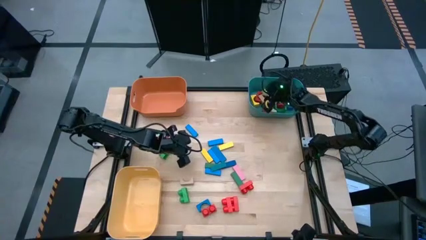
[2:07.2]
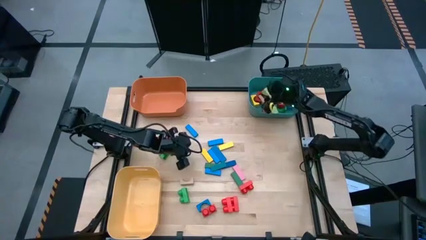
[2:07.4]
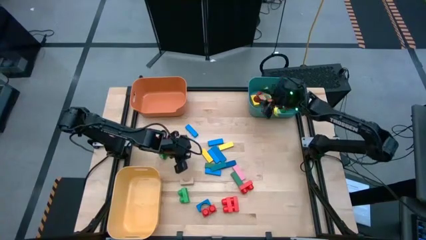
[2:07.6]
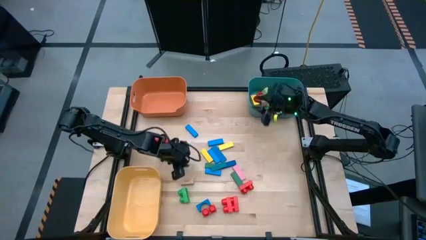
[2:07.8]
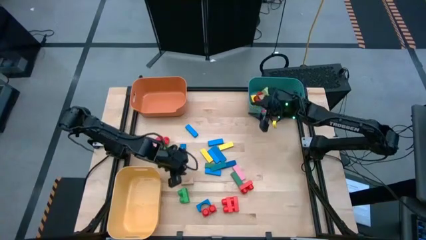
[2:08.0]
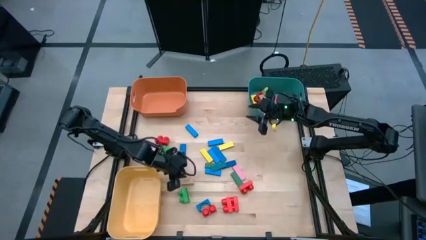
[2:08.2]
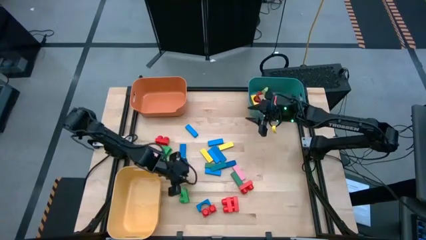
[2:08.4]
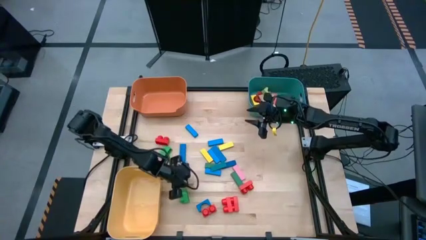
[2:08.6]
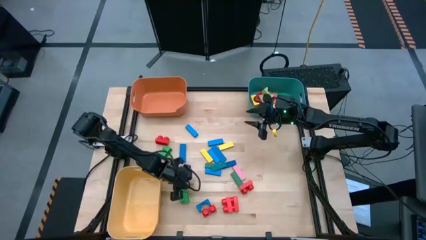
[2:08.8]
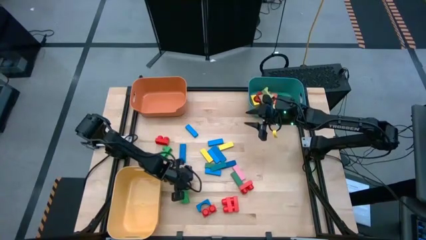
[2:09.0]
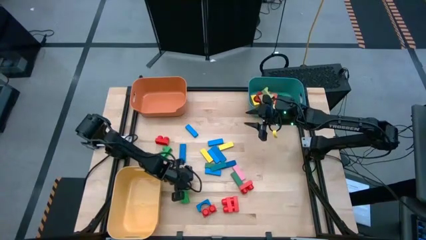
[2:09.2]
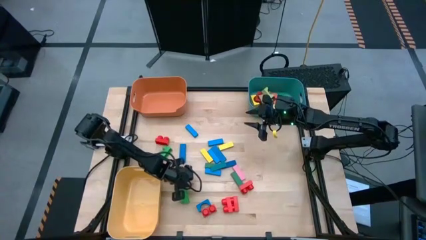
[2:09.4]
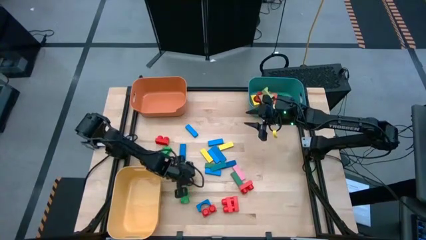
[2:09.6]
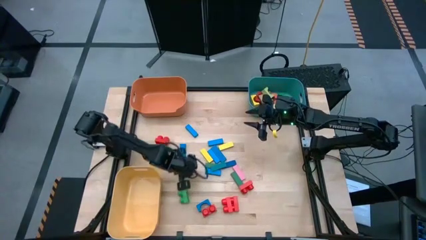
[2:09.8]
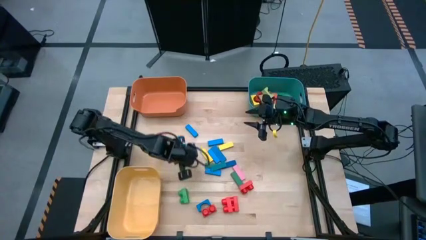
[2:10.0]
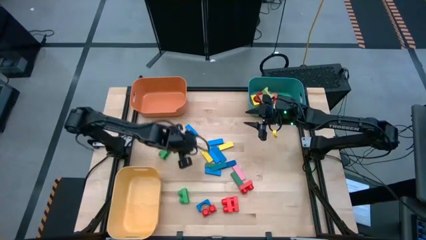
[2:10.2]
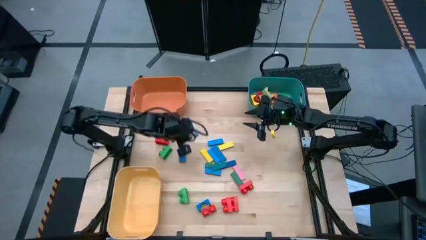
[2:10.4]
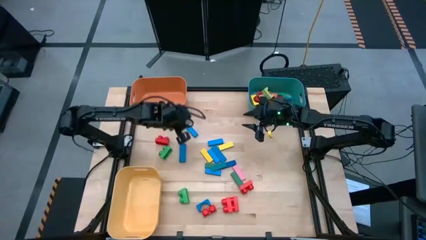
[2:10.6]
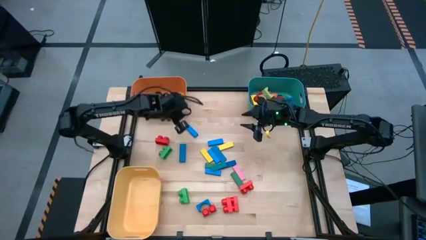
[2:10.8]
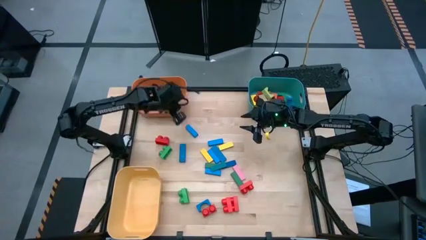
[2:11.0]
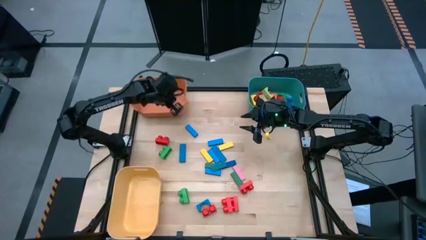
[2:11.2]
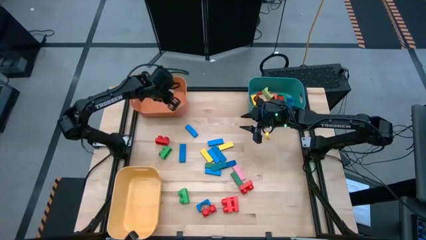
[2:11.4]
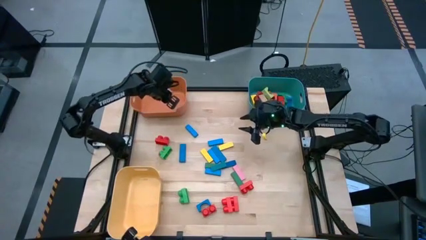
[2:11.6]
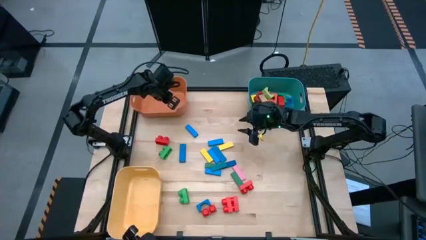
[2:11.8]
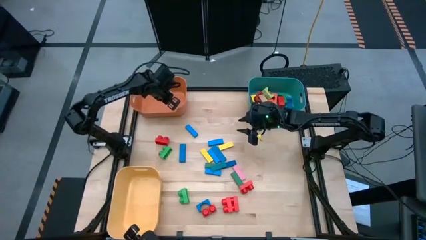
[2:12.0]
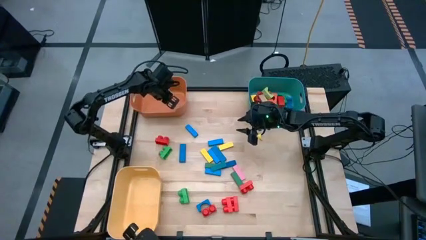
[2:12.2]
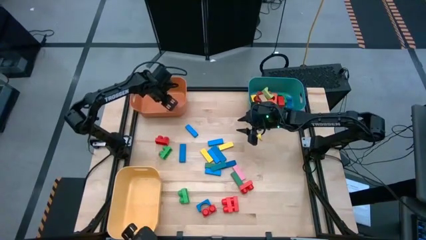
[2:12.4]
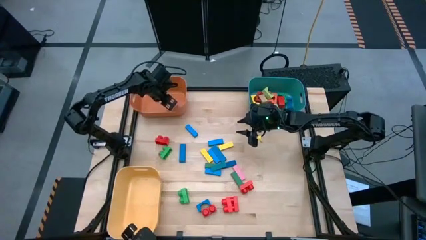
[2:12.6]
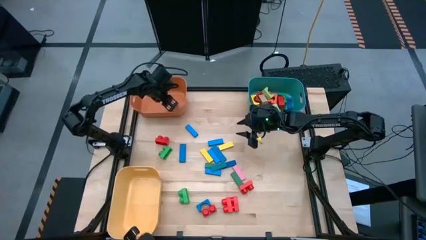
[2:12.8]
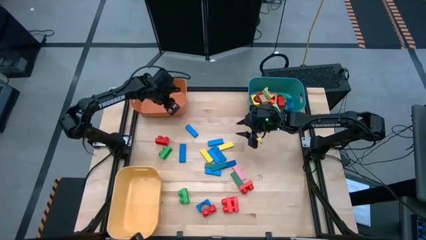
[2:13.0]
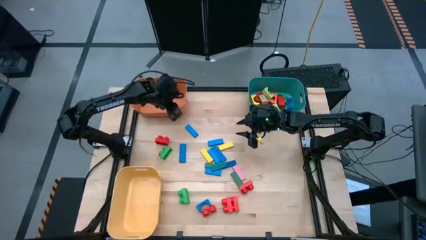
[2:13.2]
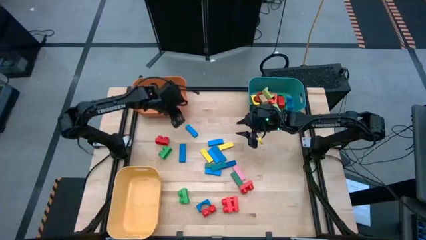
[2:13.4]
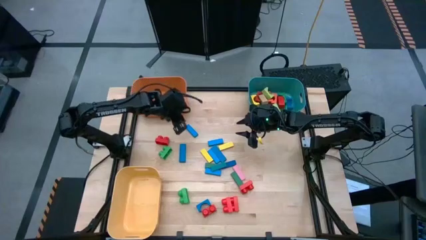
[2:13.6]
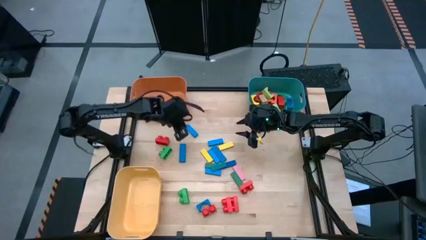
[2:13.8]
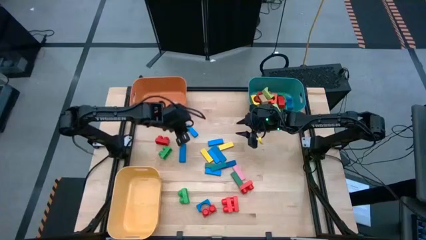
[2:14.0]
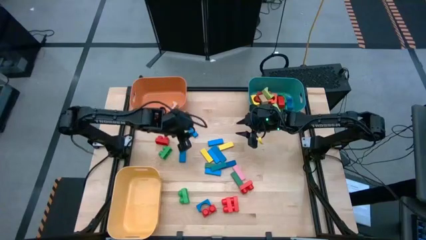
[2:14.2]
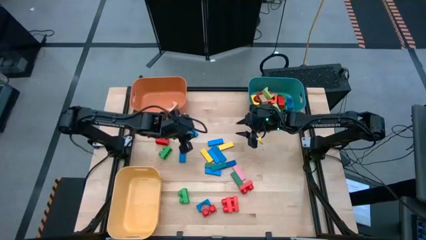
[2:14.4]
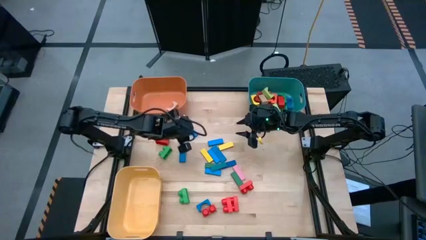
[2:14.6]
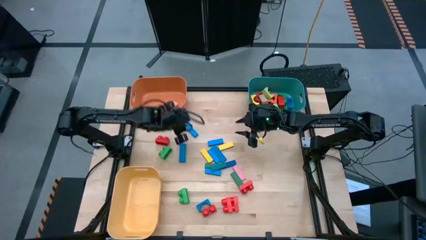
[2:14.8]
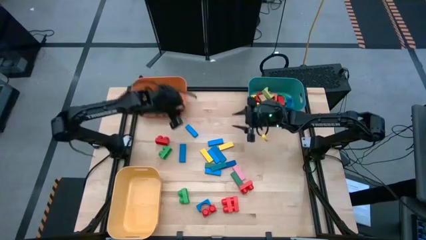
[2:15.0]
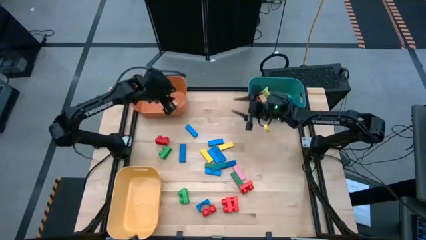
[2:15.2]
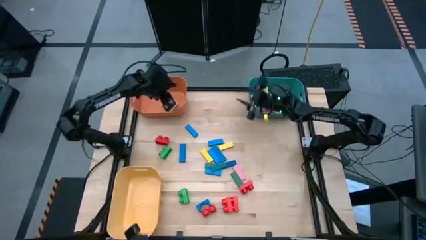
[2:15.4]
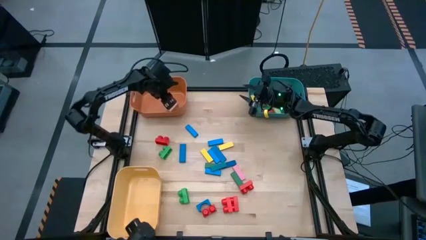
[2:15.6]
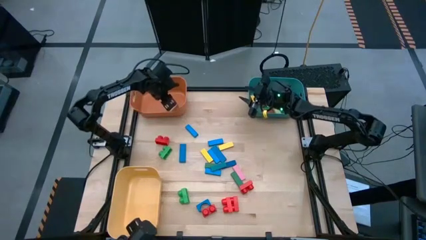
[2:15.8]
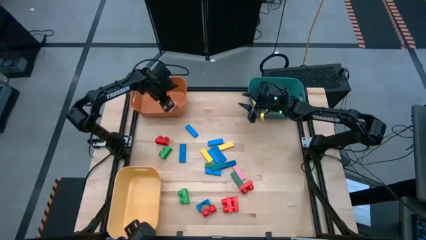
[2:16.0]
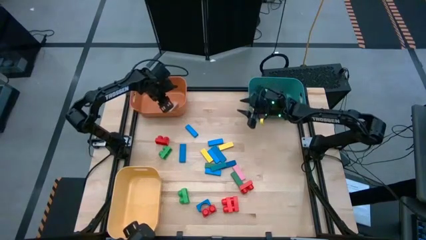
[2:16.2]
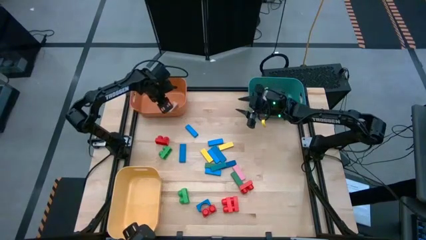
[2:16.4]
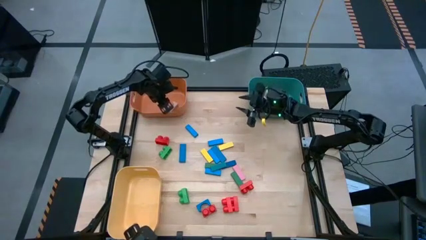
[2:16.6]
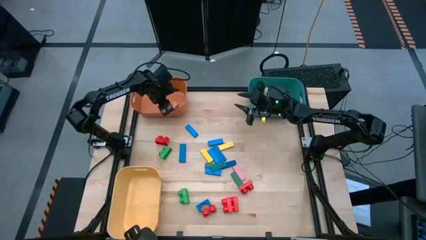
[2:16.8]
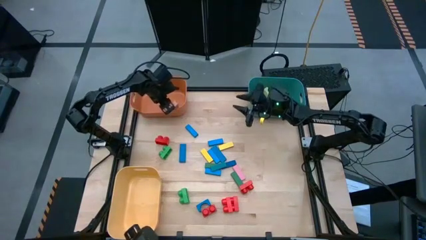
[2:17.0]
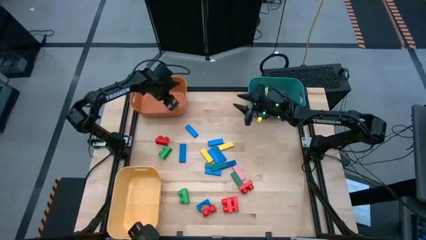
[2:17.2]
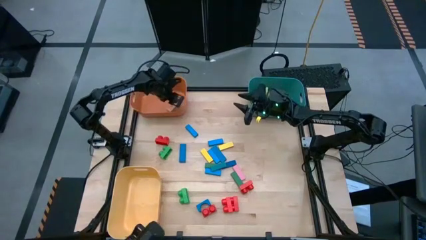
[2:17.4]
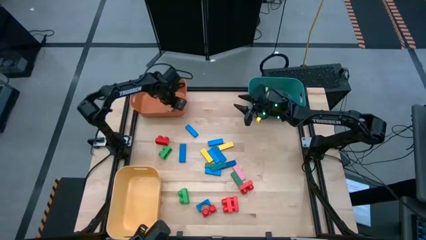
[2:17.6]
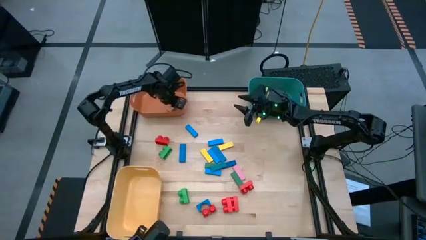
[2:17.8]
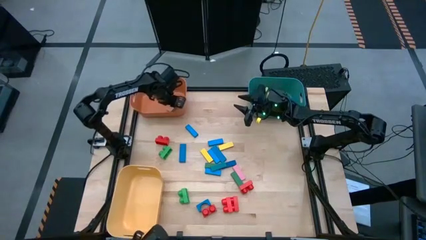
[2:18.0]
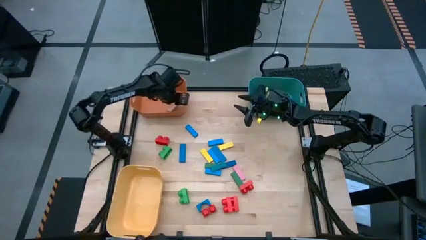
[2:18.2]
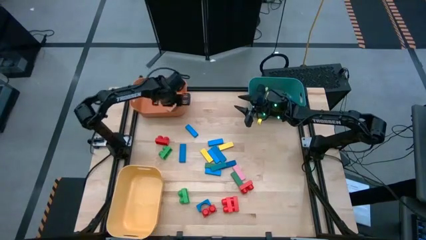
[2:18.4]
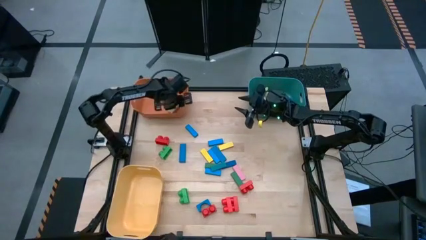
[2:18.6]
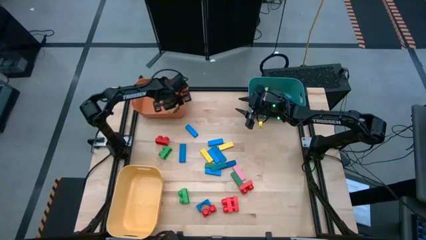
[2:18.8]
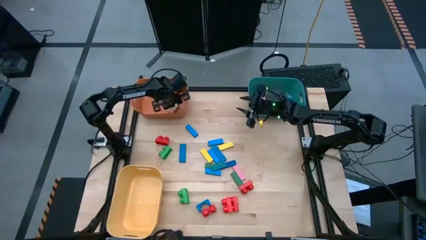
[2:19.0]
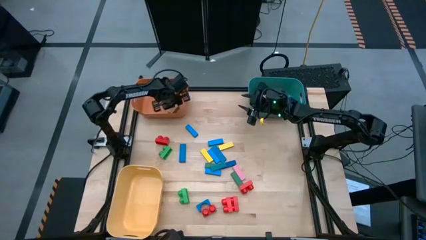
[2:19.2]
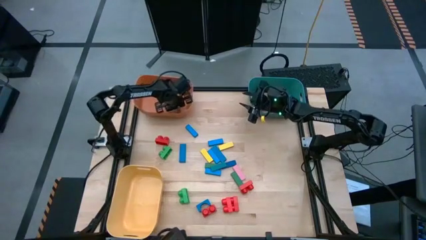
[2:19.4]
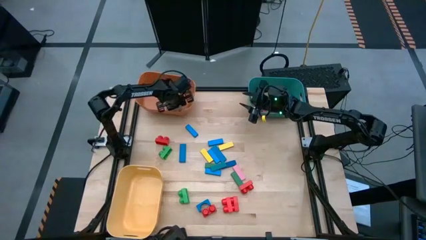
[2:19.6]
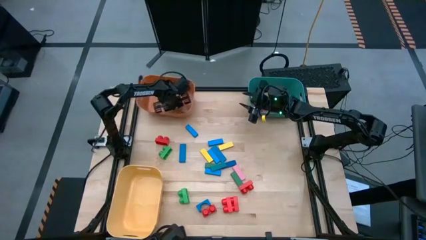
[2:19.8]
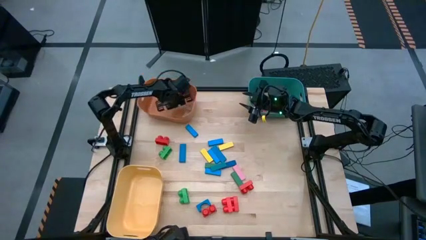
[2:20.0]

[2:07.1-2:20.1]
Task: Sort blocks by size
Put the brown arch block into the blue bin

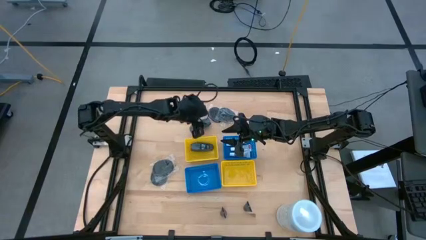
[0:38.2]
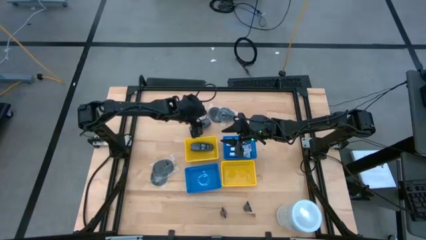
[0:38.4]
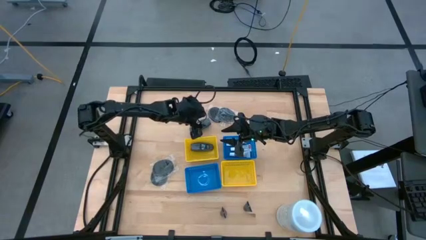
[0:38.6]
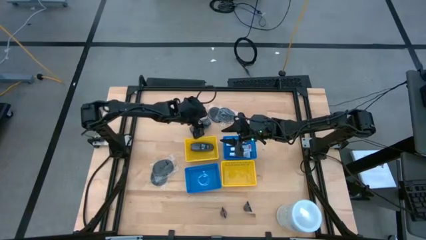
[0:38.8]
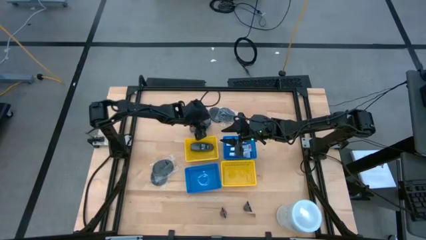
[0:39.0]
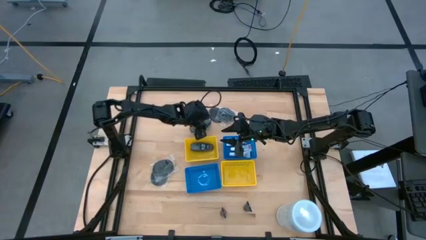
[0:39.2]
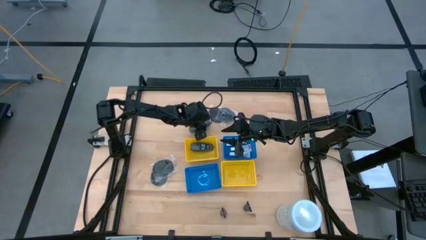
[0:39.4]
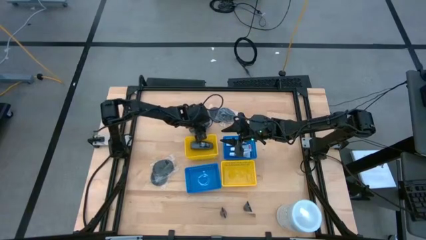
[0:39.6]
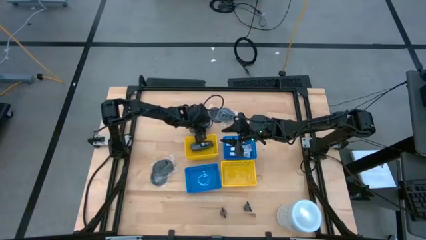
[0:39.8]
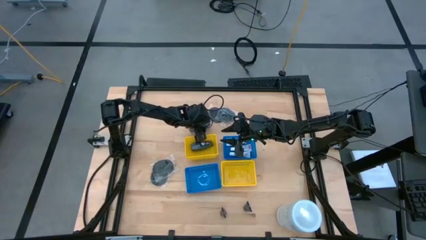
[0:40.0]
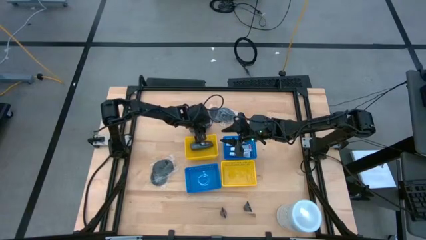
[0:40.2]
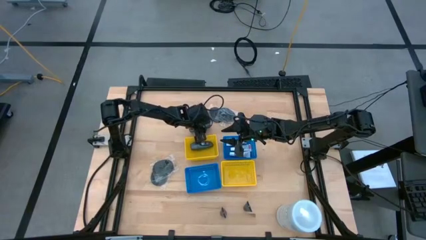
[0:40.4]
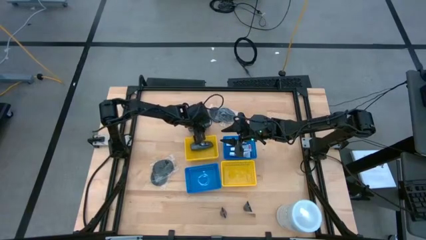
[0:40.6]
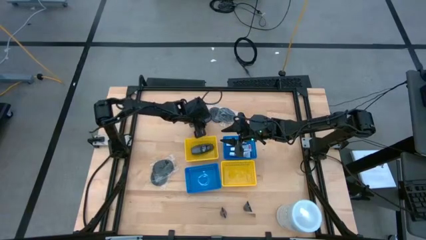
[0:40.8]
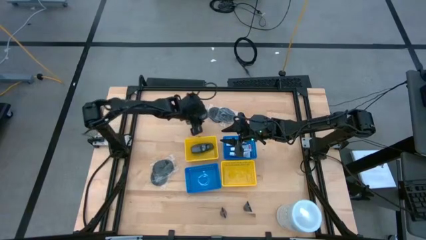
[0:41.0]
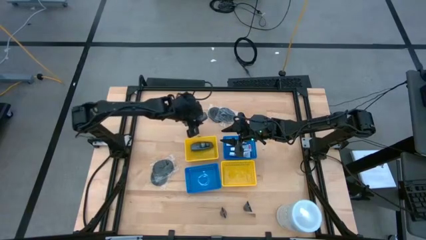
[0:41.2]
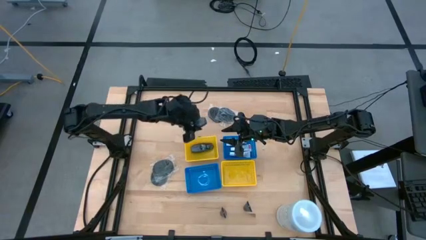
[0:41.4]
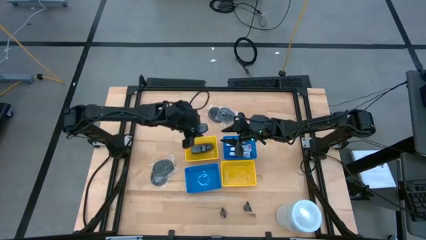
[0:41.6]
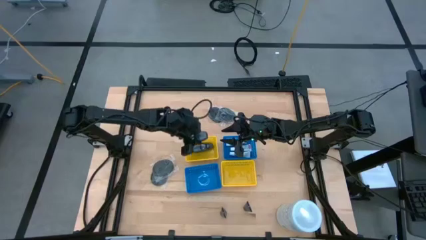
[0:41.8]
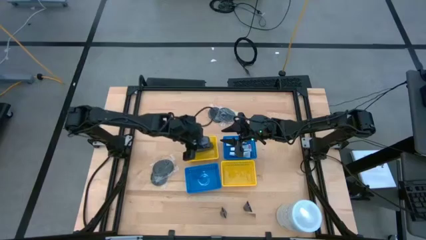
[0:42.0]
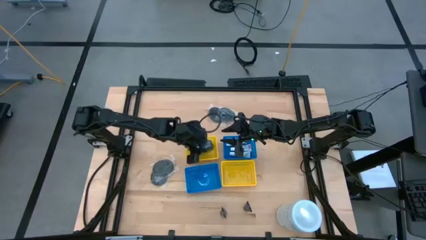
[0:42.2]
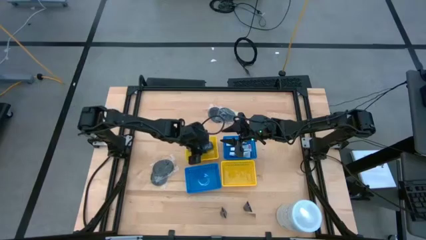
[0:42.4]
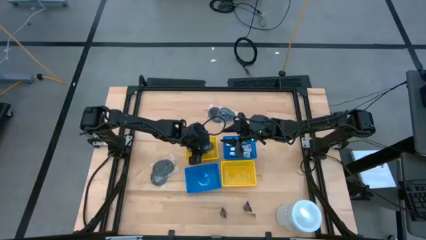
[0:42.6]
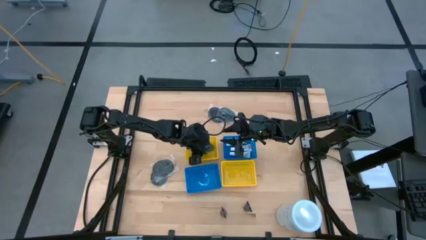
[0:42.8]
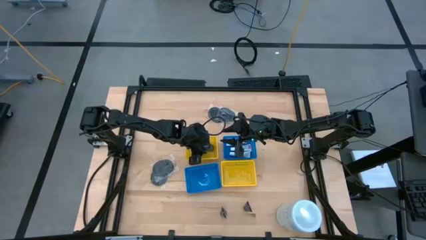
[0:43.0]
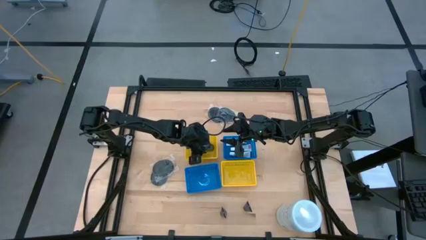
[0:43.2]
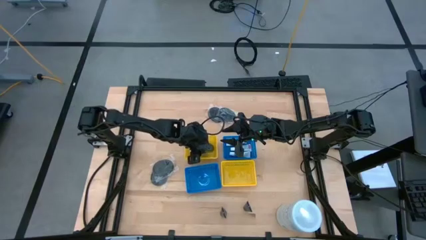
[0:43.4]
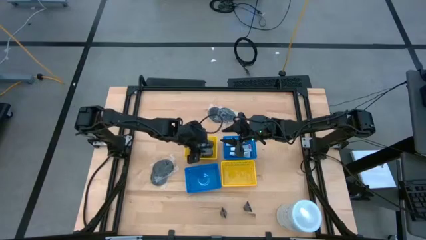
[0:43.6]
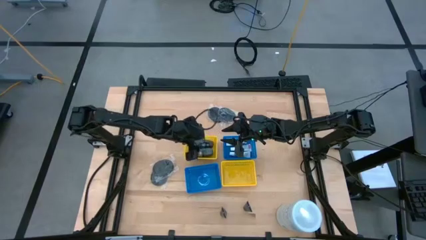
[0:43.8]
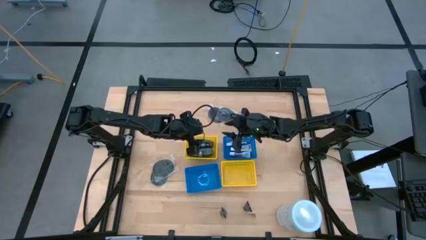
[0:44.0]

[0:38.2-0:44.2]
Task: Pick & Place Travel size toiletries
Put the deodorant into the top left yellow bin
